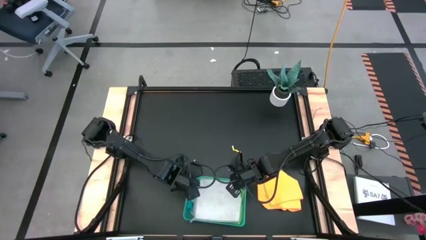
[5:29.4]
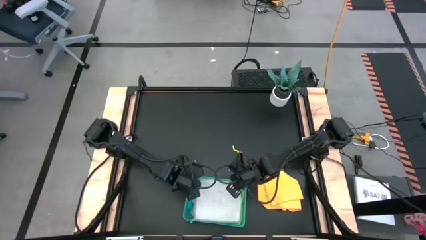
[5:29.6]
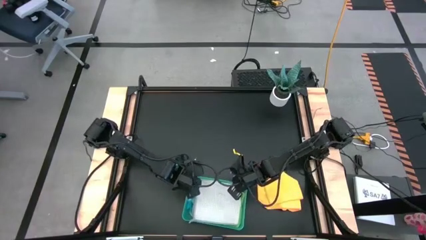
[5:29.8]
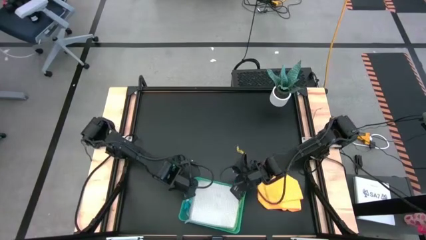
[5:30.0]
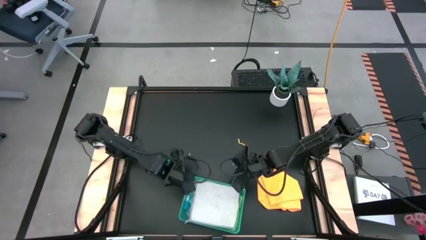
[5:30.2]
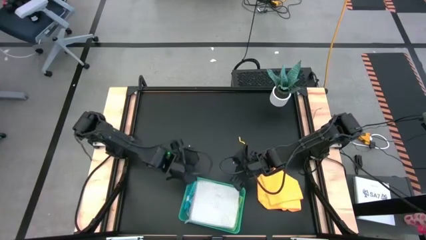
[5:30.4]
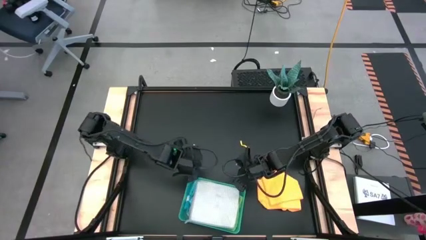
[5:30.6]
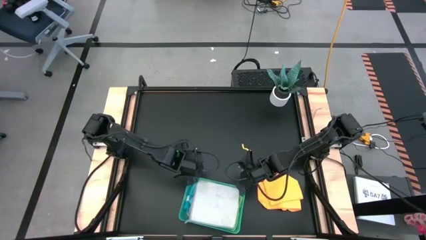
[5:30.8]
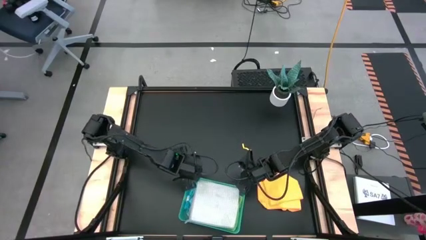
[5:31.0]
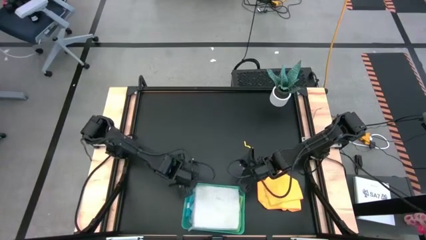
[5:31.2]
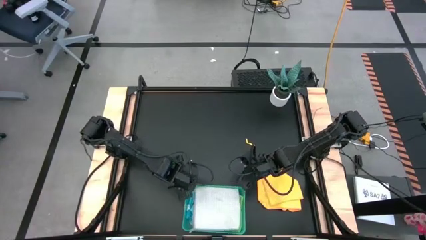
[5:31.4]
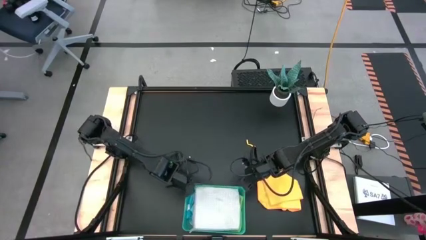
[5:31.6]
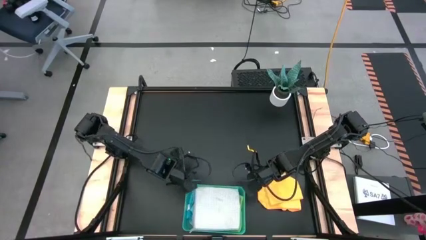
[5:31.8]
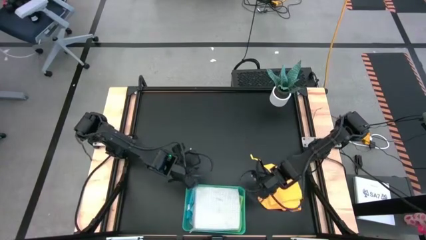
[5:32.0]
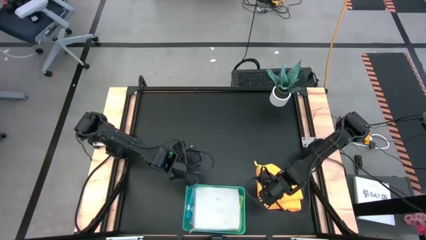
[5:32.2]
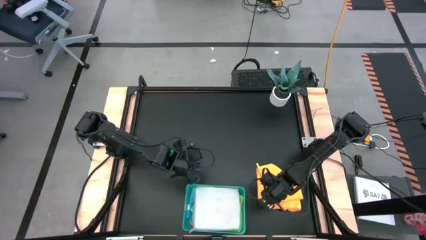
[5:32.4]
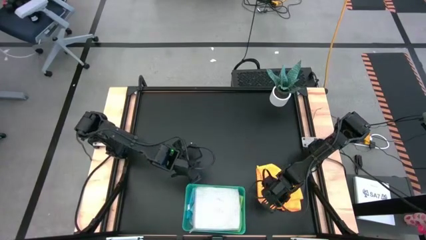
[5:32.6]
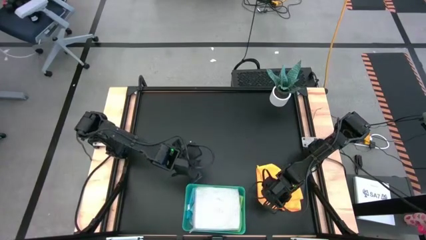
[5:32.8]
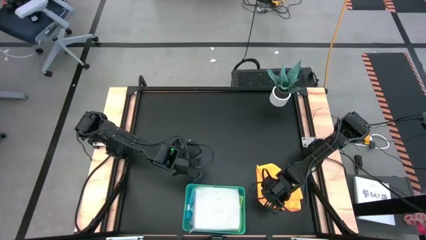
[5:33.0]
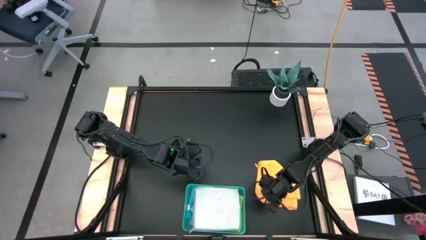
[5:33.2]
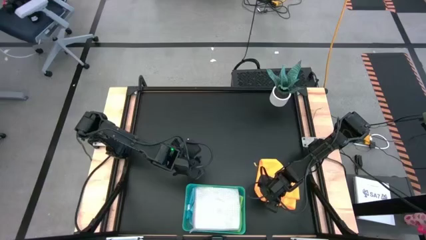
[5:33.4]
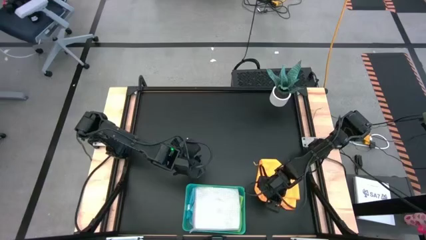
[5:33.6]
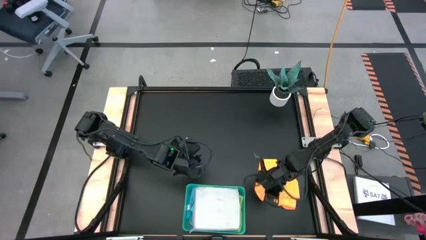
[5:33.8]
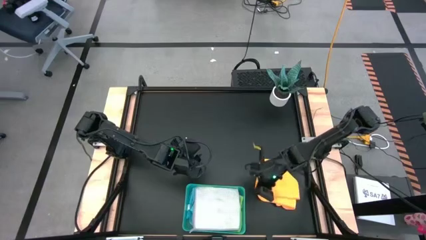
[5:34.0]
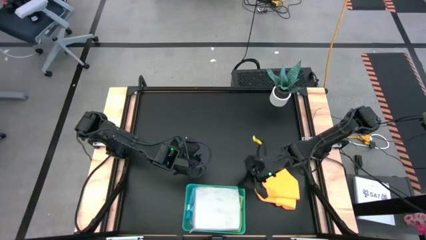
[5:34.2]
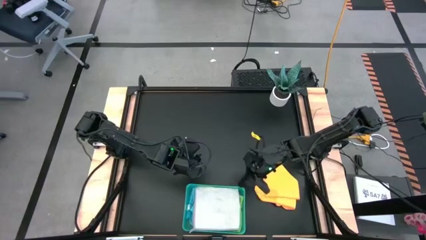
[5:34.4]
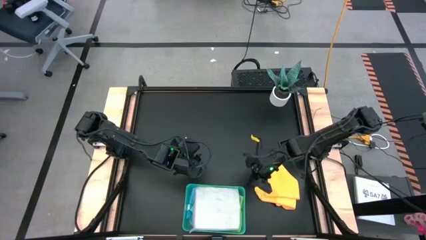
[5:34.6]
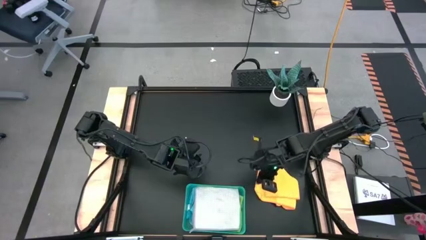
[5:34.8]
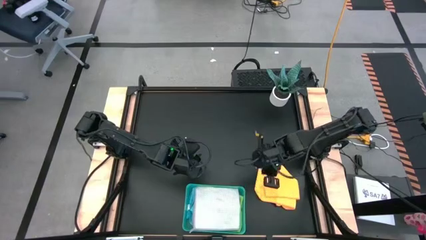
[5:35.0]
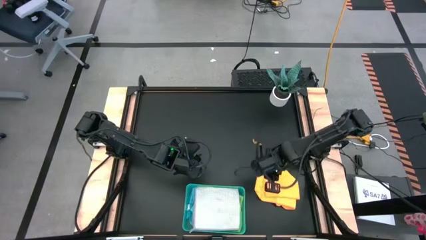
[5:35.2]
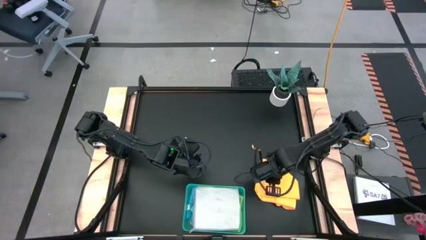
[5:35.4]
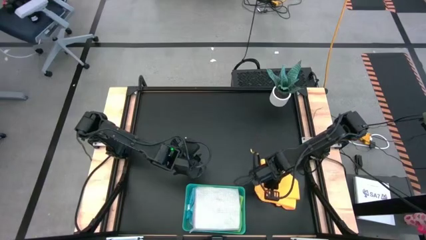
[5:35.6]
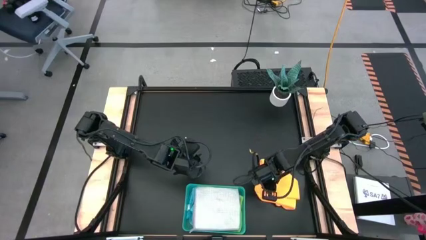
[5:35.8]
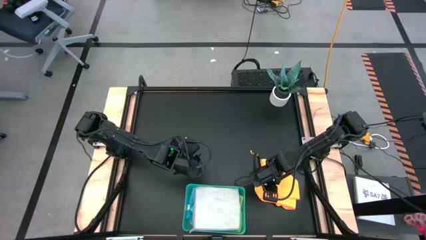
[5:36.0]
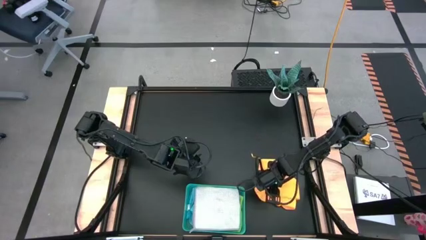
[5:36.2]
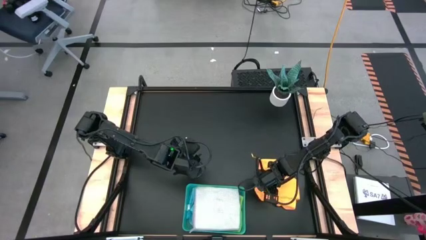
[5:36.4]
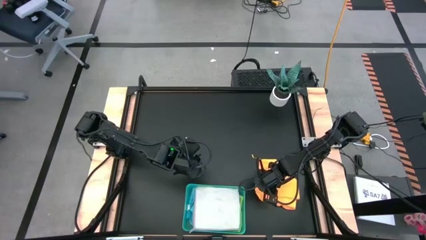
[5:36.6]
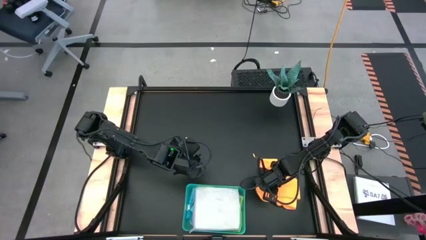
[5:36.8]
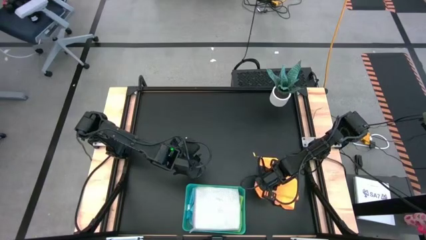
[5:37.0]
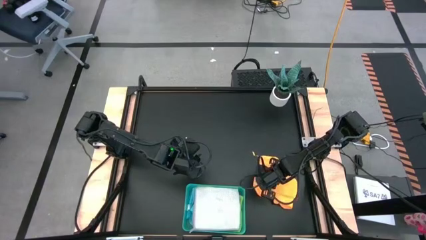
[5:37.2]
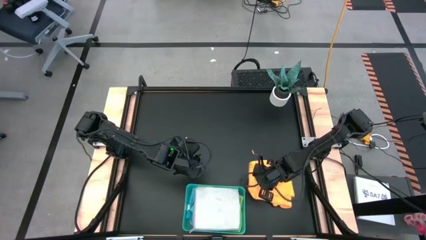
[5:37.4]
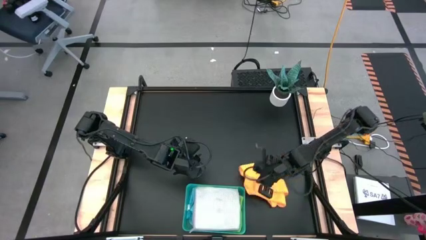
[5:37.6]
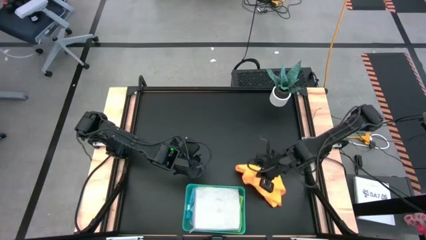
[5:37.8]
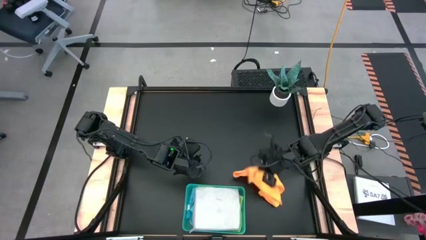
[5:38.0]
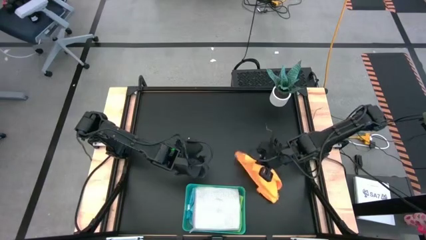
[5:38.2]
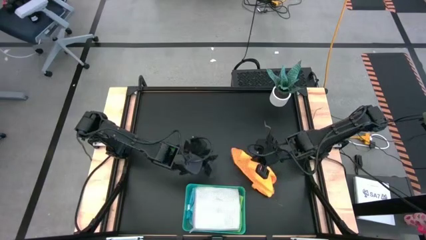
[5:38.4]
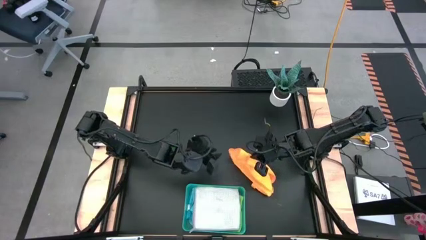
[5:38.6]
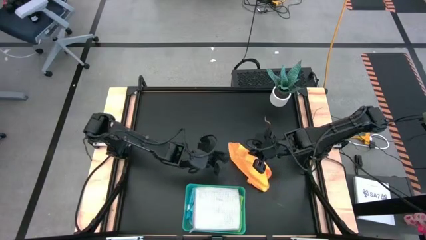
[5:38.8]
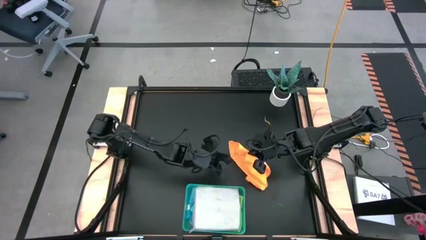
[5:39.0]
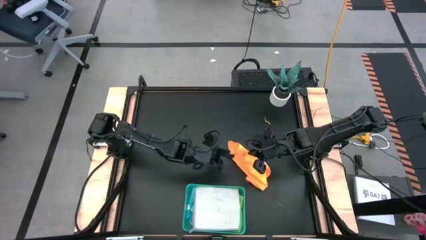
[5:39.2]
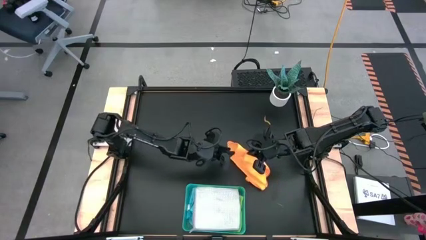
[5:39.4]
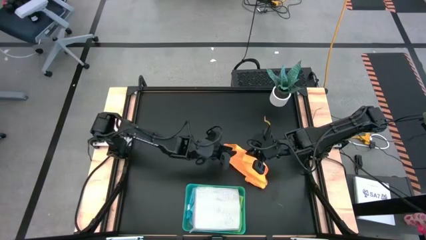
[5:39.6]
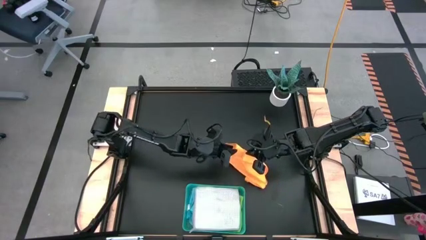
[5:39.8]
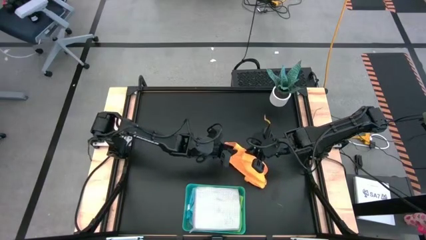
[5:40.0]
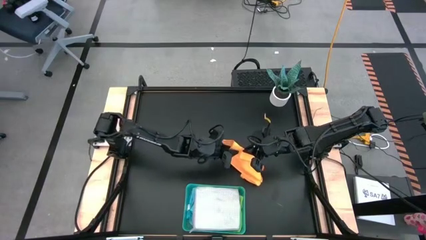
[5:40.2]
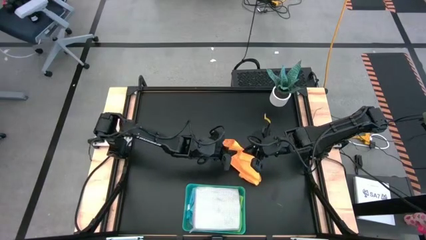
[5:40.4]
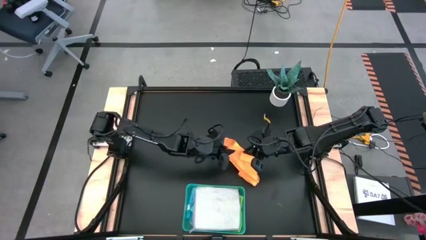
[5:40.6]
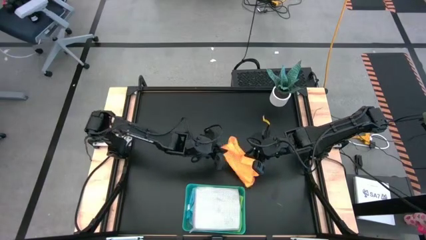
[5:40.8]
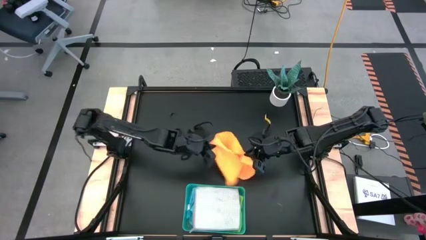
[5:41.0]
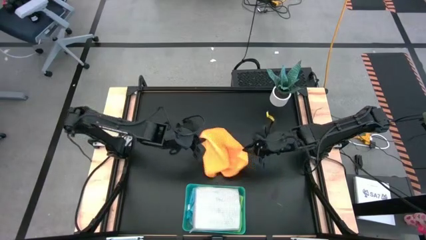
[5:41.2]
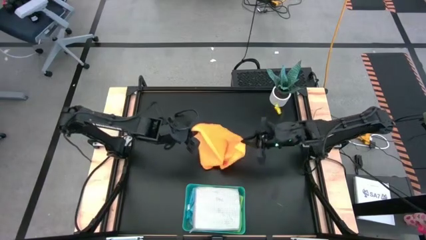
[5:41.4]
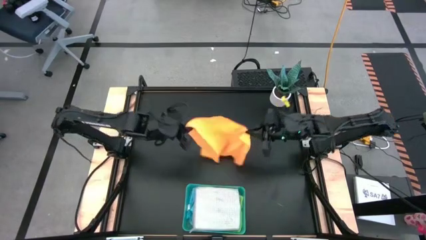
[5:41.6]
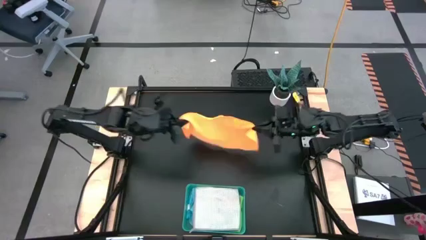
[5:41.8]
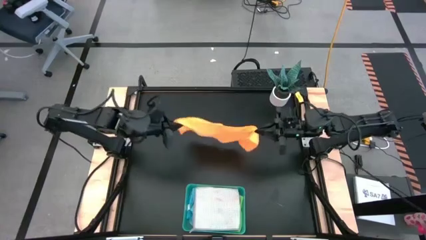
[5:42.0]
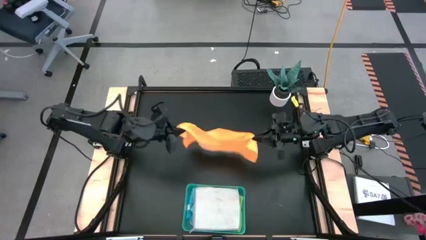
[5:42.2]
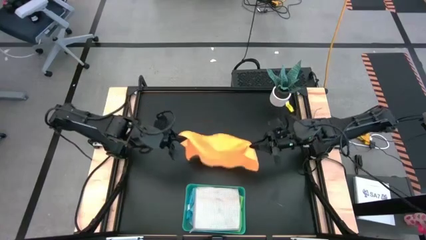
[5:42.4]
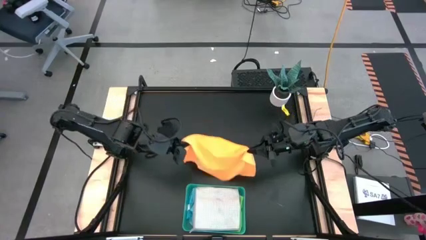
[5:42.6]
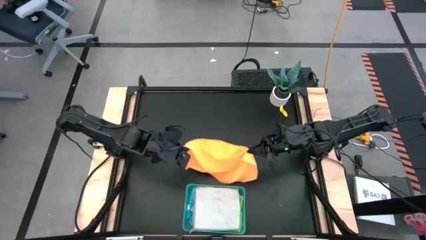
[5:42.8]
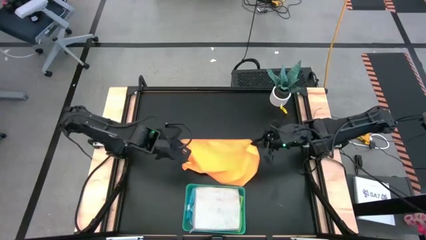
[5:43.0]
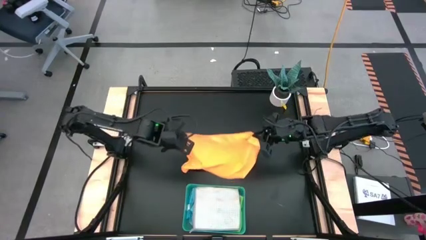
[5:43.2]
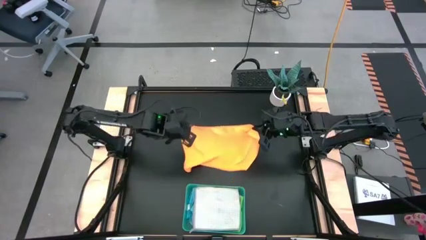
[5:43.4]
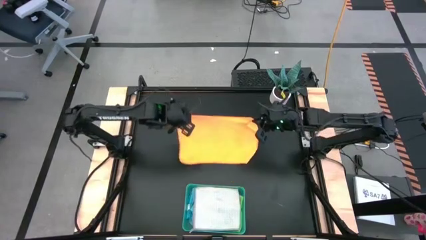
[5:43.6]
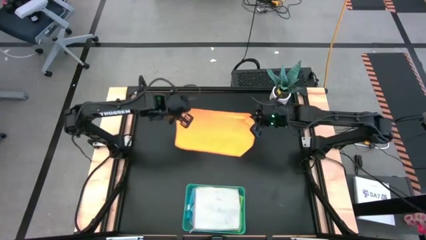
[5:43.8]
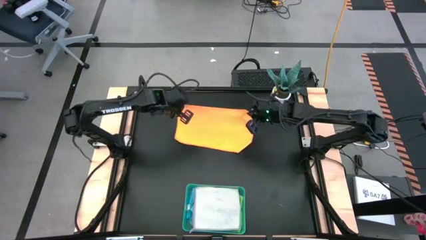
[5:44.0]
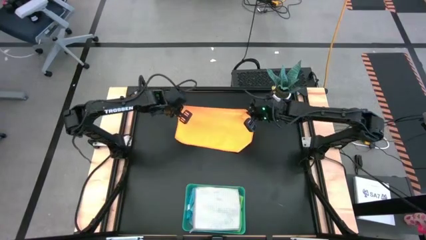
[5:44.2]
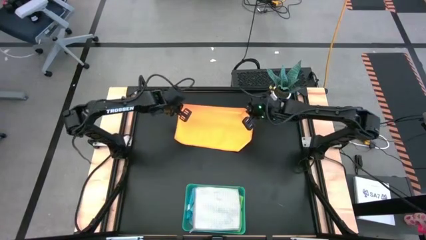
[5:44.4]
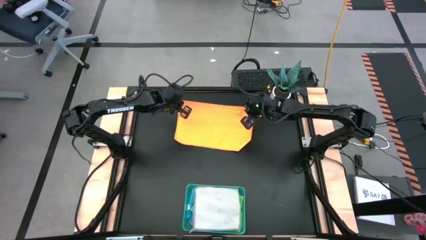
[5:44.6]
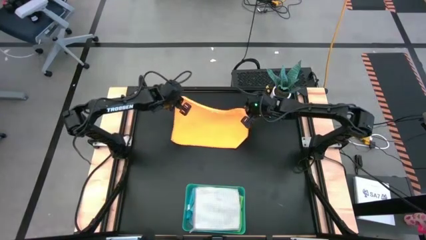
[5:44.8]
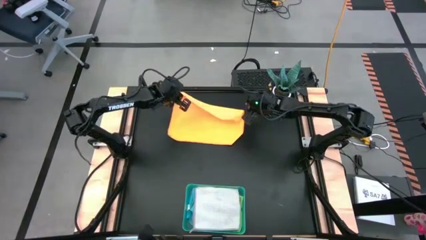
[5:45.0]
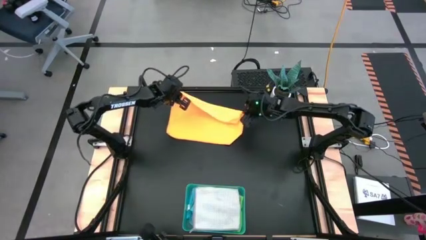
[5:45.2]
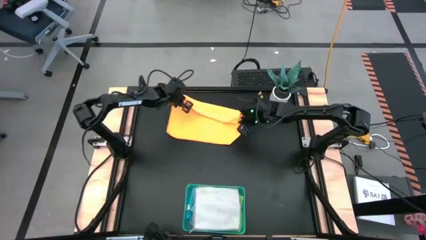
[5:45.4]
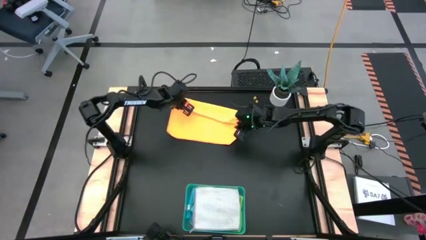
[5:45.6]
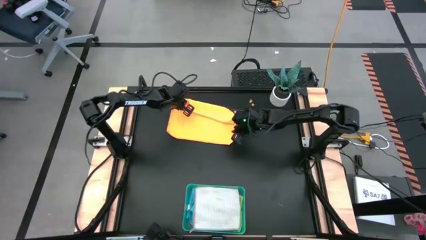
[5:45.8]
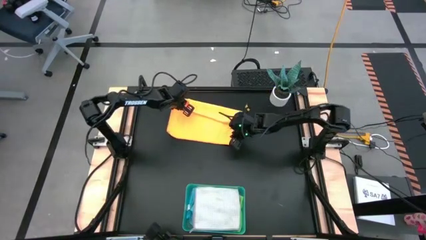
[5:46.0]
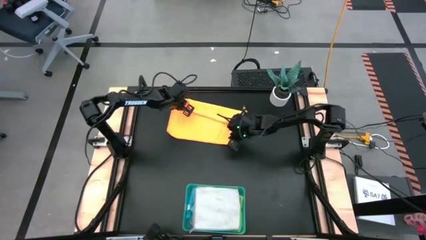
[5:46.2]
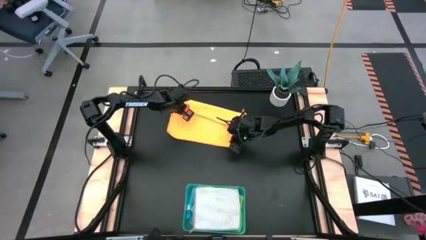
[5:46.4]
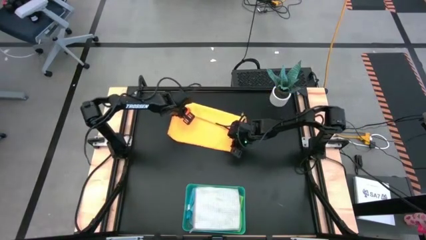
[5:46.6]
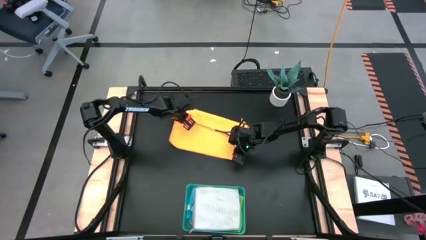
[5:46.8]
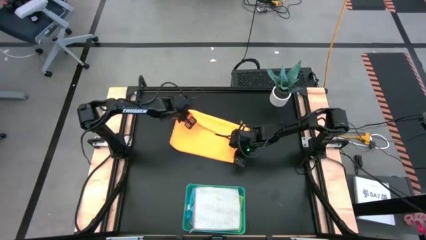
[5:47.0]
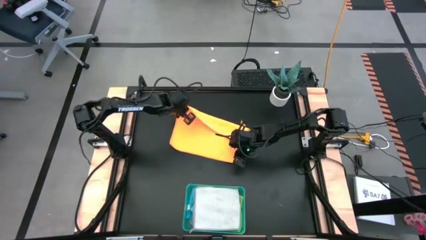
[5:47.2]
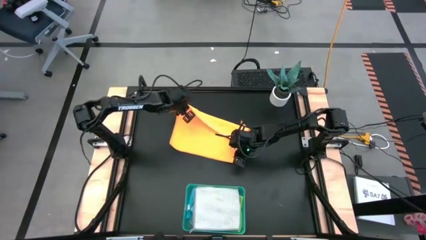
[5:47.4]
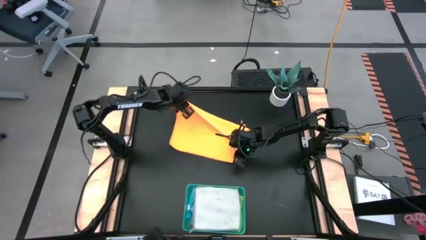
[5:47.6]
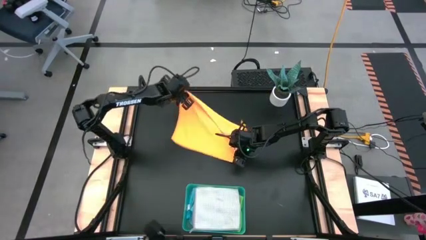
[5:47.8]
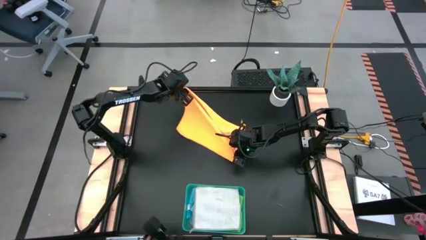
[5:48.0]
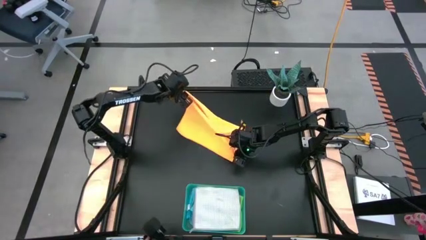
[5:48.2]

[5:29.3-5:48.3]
Task: Fold microfiber towels
Fold the orange microfiber cloth
